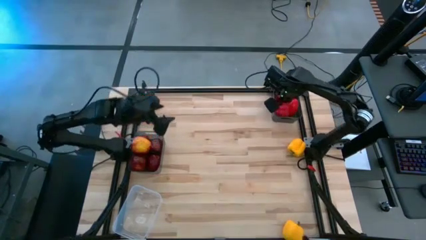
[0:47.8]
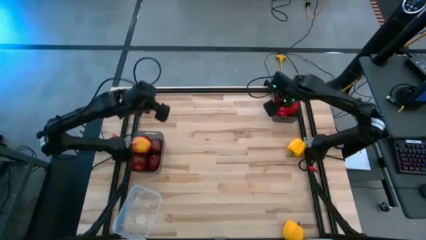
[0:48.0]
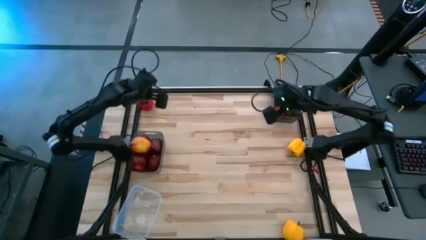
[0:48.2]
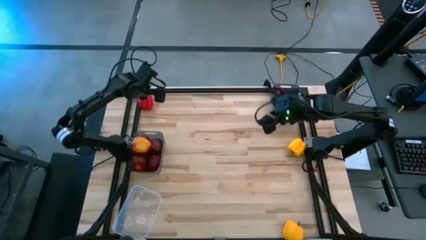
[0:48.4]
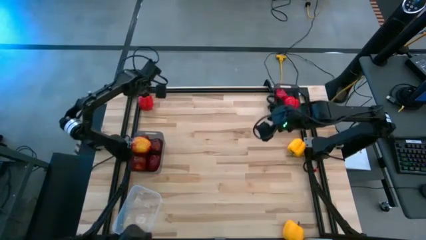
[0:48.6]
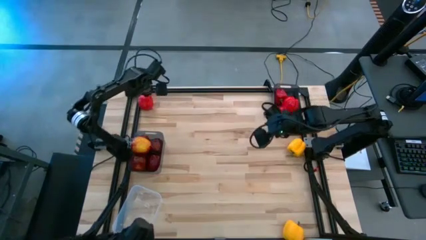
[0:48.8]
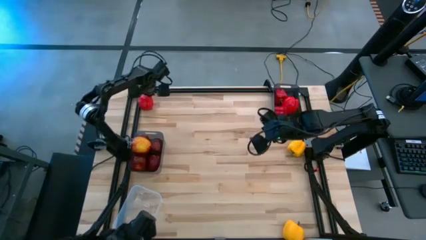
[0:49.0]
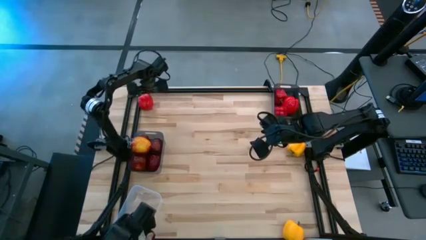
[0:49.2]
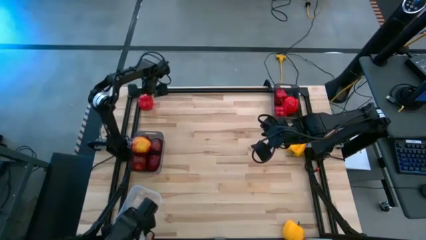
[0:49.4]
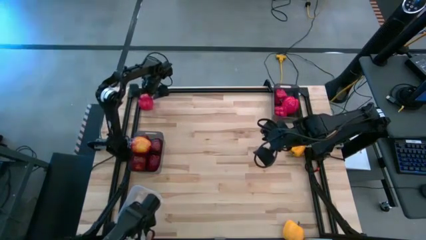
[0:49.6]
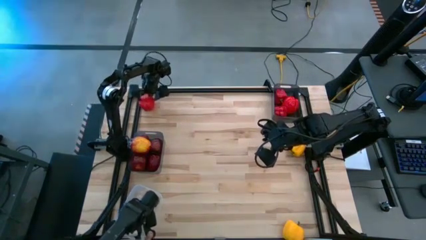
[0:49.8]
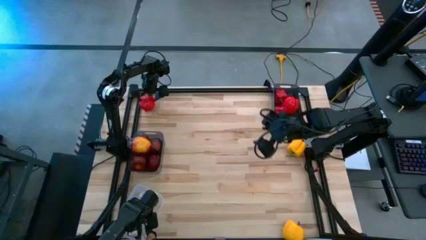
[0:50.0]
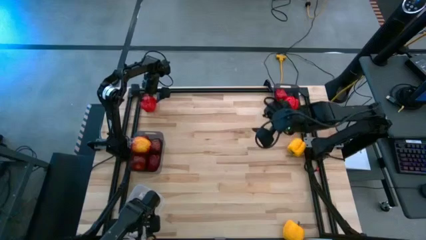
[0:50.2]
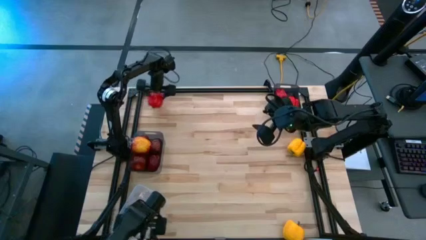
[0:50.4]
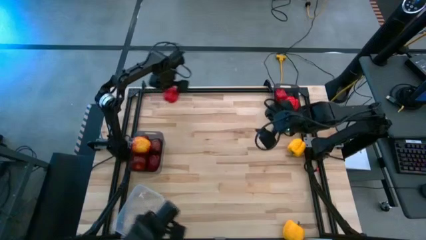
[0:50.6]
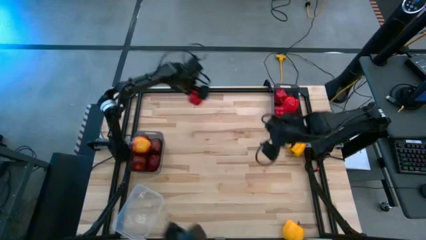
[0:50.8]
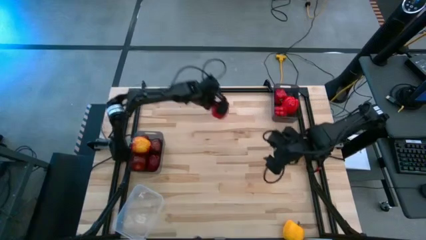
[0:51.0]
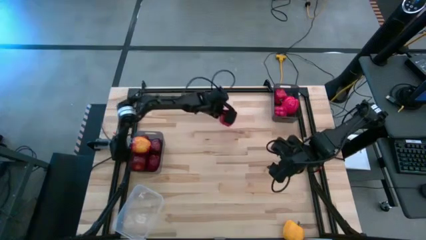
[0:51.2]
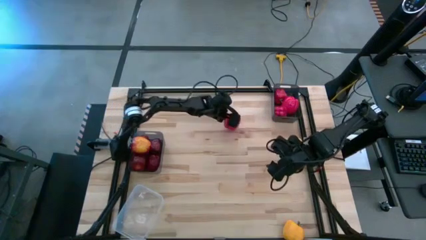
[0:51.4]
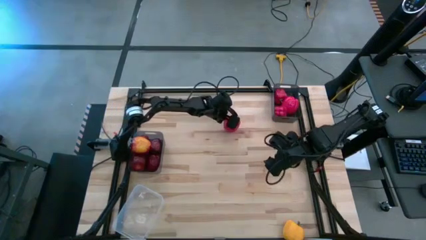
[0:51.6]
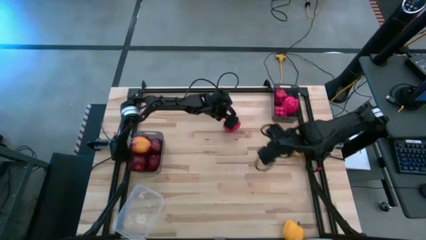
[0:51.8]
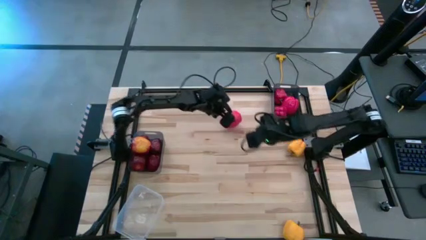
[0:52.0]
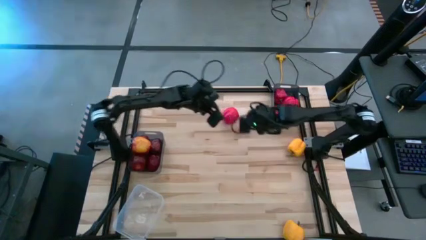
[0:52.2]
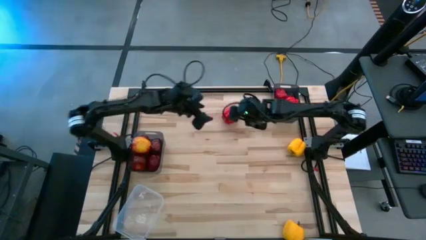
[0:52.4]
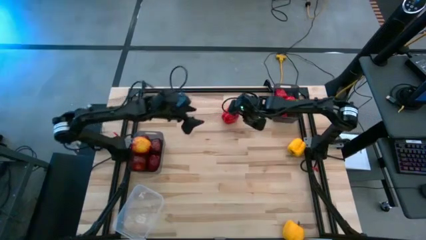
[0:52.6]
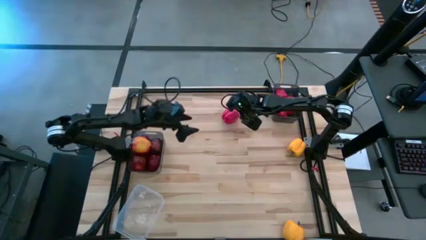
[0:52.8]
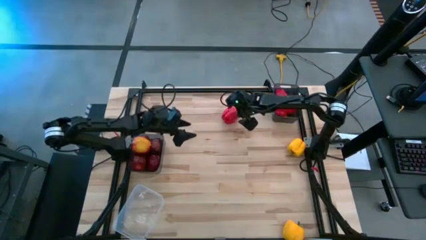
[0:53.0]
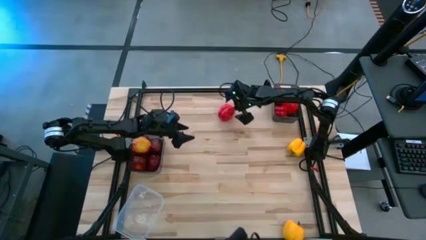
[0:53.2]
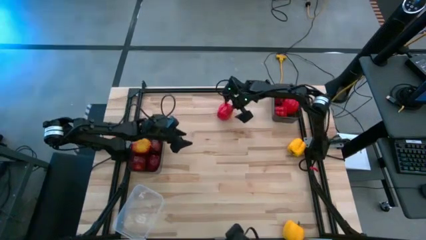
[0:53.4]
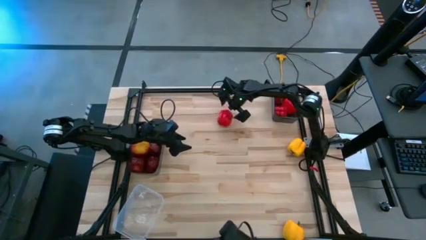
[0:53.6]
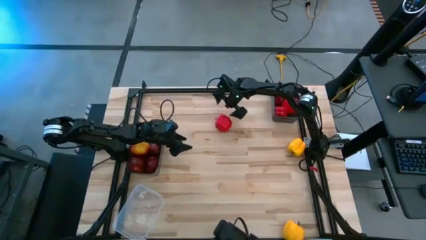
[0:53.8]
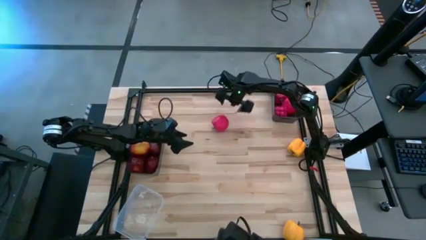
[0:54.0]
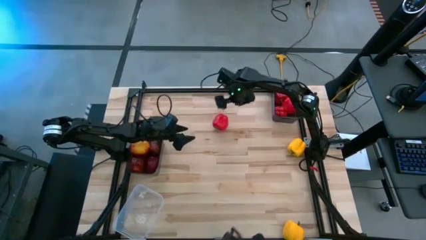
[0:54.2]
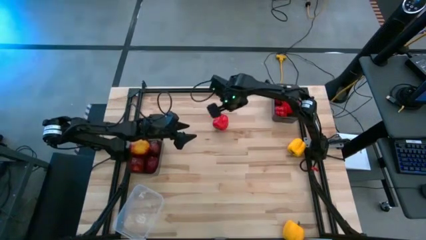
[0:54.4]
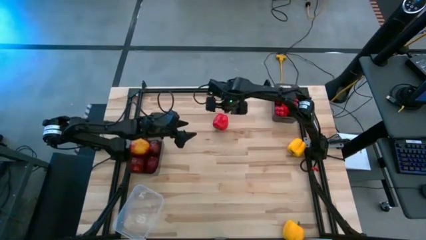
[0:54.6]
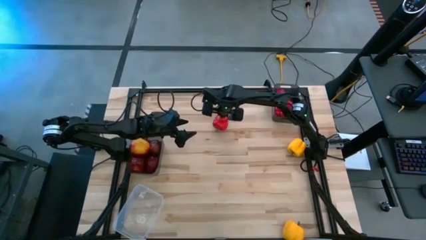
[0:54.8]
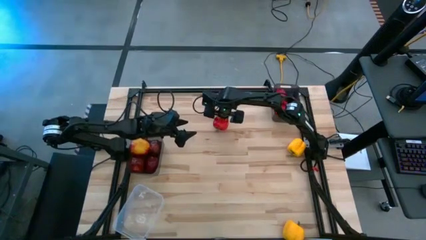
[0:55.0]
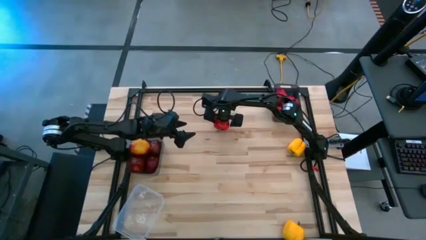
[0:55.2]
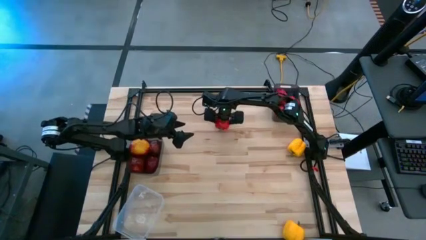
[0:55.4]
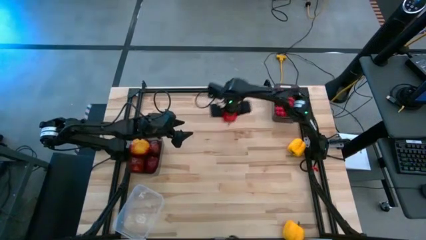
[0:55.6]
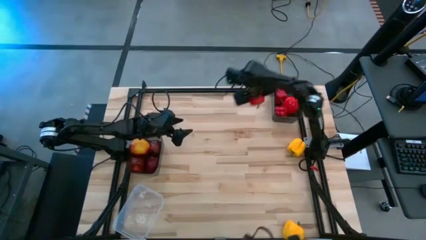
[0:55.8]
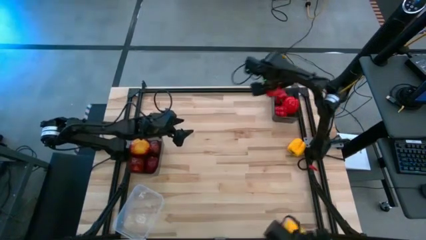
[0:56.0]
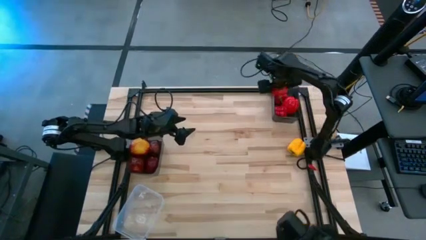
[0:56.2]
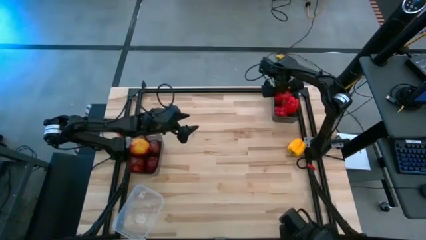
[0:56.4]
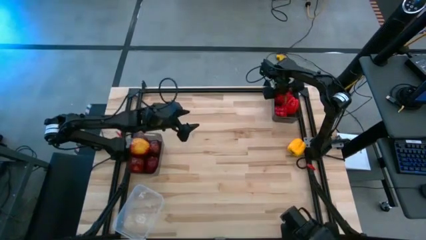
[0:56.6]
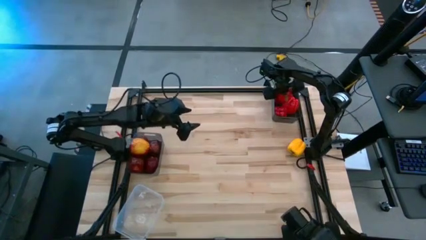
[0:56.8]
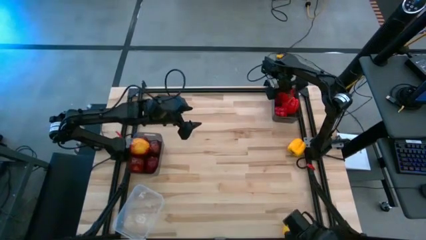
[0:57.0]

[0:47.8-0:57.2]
Task: Sort produce into baskets
Put the red bell pepper into the right black transparent bin

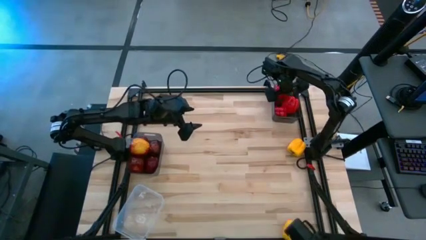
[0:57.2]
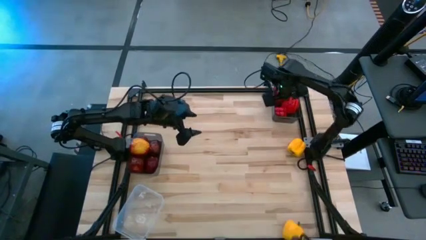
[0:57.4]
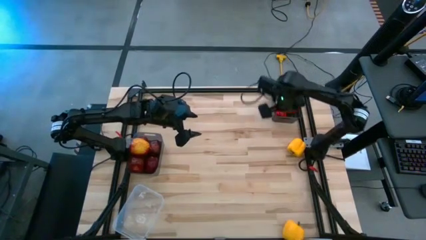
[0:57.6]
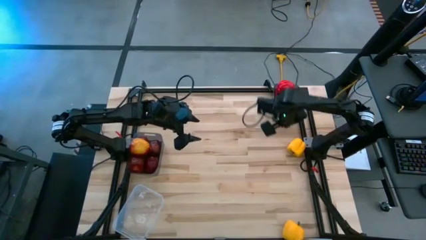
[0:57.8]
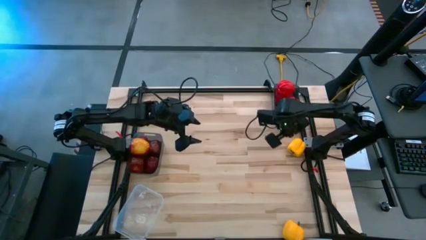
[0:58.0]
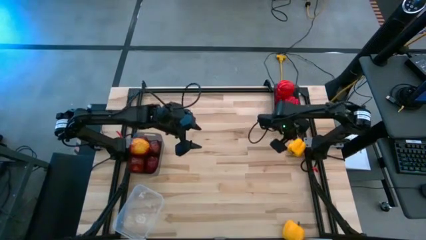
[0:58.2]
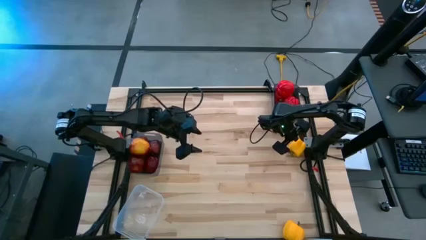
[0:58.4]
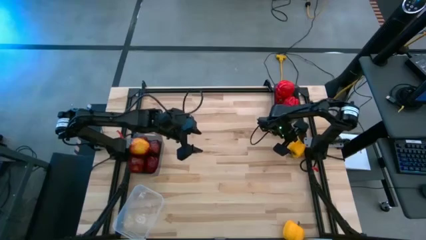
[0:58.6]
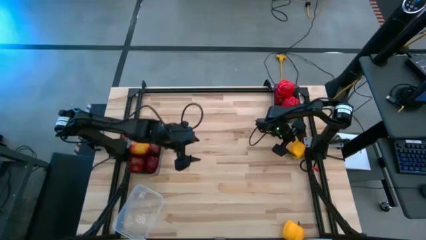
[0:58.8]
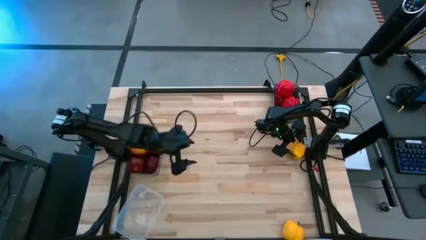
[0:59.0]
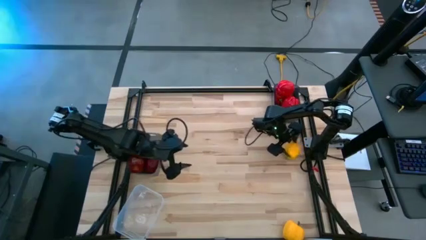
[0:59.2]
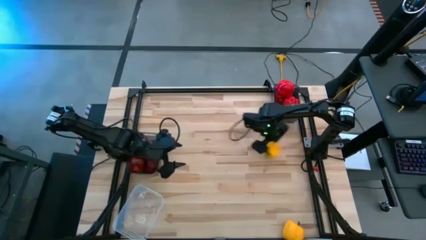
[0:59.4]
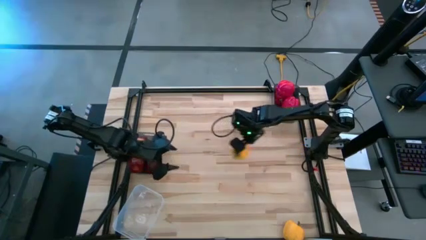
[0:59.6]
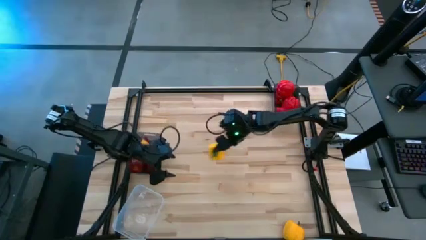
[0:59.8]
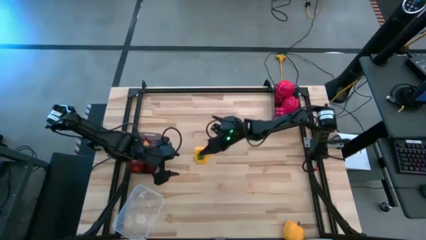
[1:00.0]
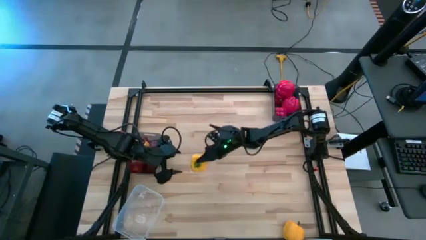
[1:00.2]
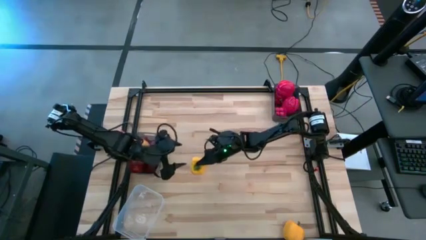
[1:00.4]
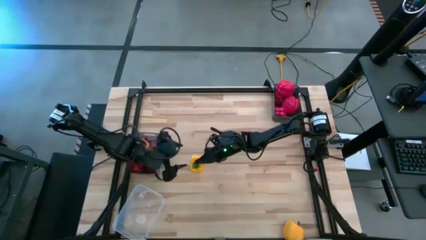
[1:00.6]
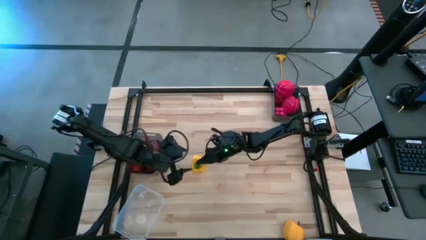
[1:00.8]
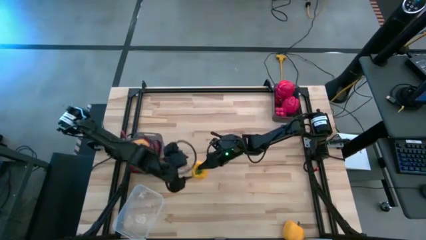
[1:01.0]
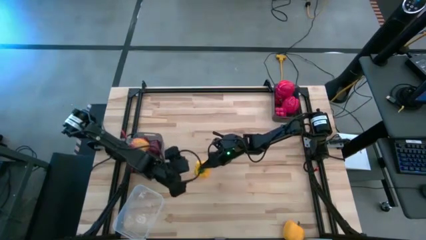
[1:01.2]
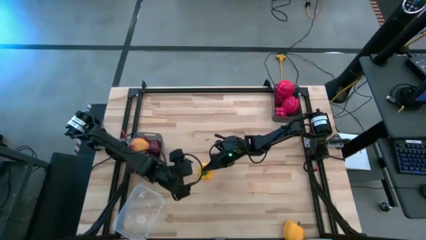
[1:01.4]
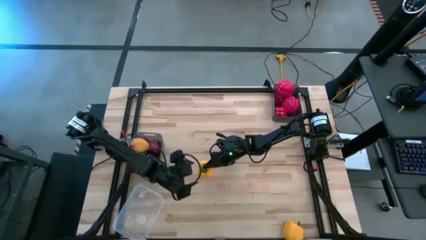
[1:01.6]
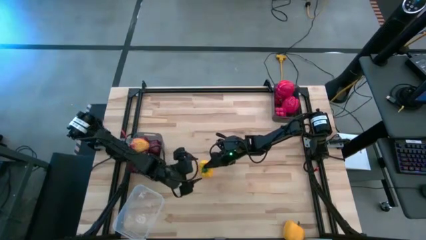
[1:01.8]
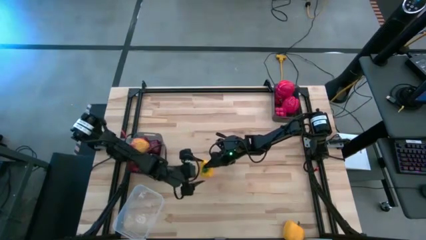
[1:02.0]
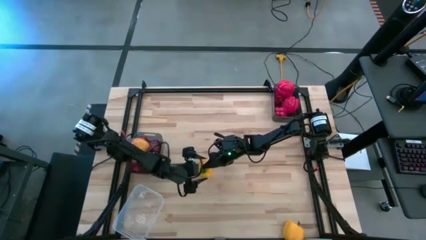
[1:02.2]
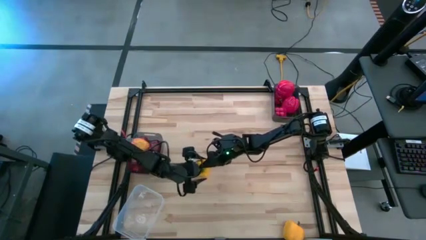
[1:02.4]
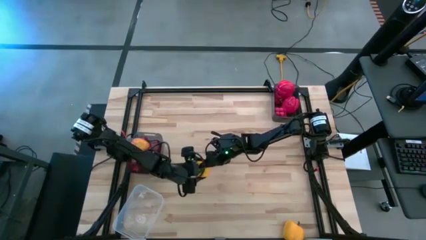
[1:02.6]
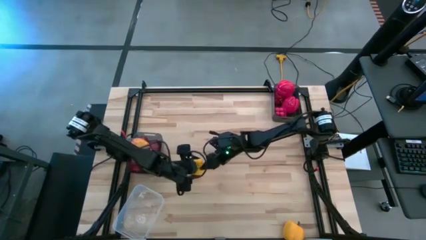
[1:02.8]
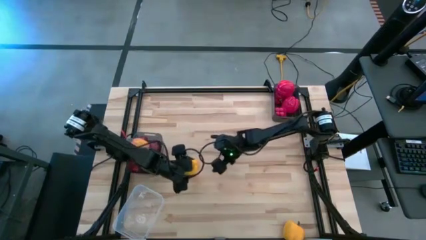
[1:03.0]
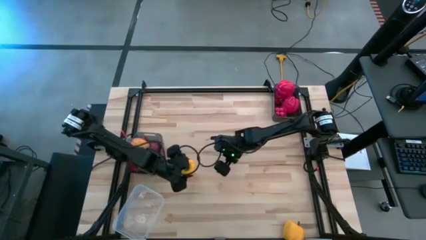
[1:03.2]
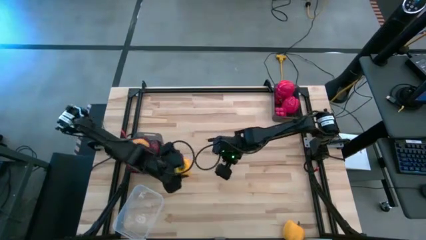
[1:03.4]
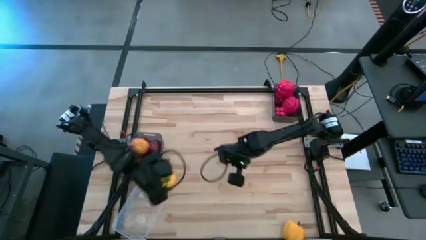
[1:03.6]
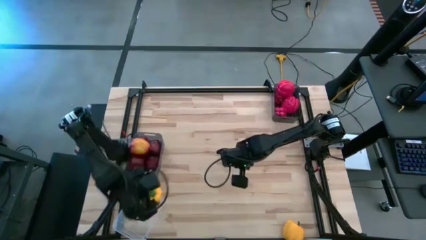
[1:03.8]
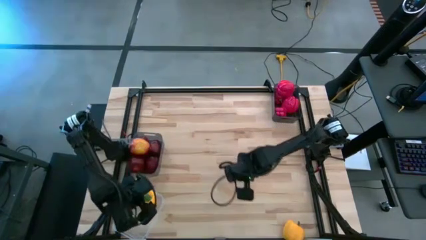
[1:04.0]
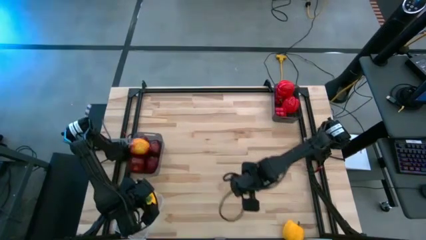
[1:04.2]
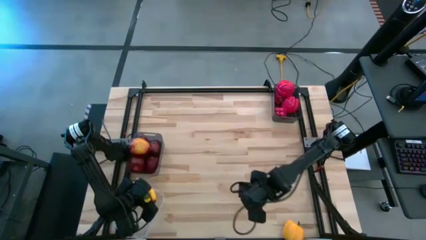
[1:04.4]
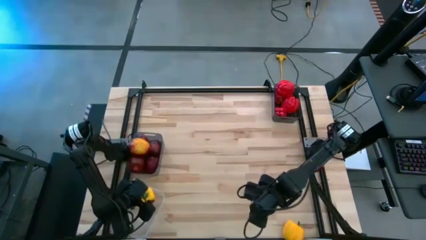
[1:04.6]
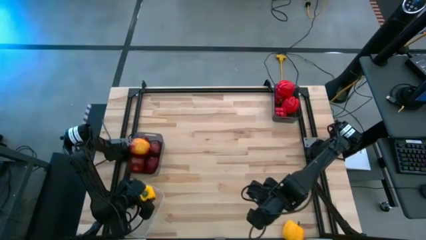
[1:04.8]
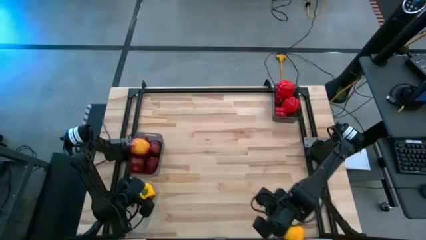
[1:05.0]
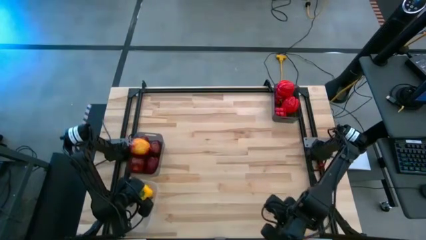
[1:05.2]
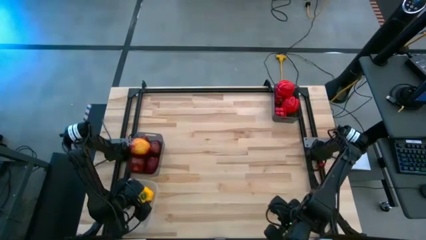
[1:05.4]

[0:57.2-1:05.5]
Put the yellow bell pepper into the transparent bin
